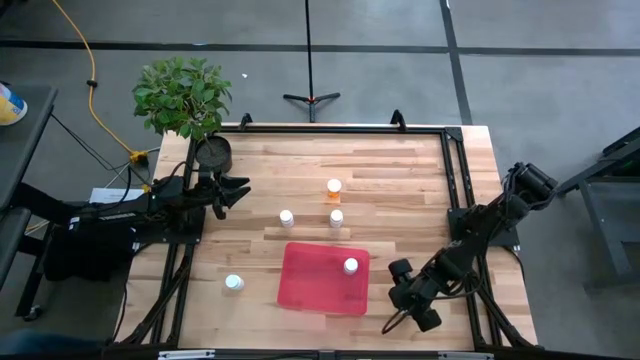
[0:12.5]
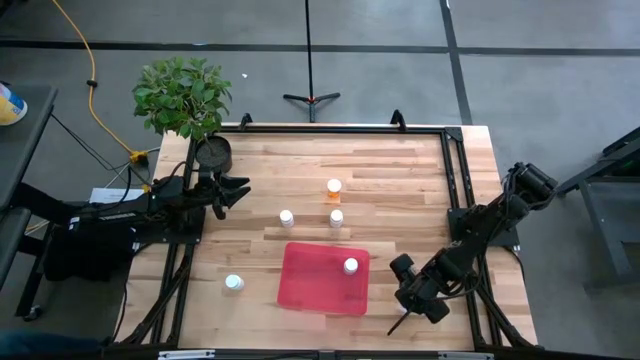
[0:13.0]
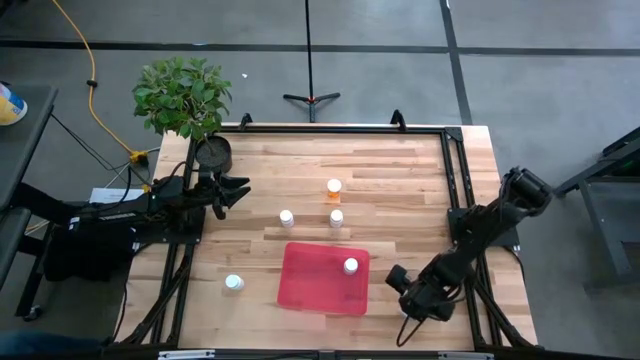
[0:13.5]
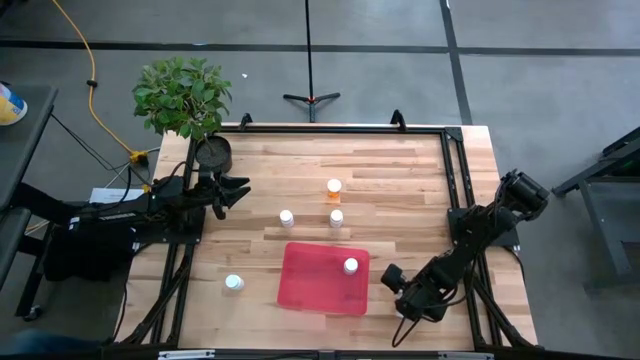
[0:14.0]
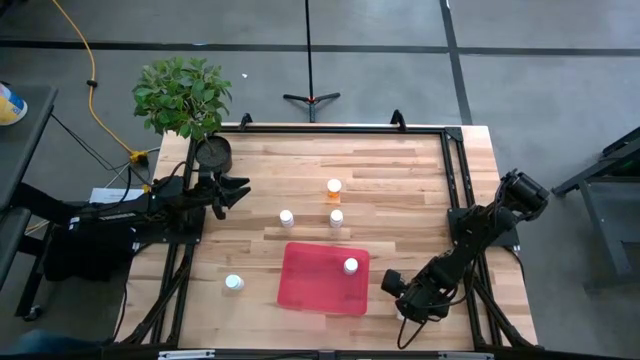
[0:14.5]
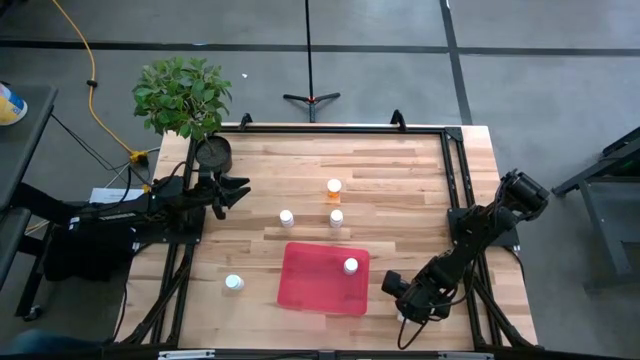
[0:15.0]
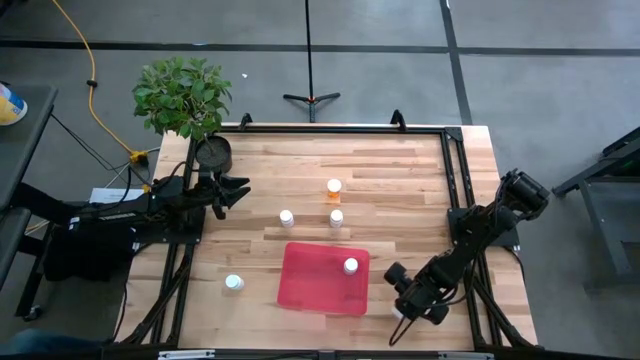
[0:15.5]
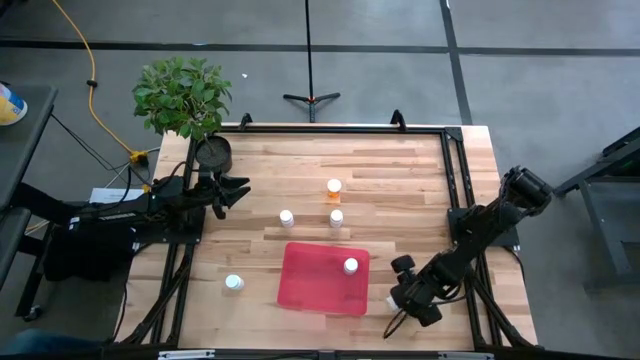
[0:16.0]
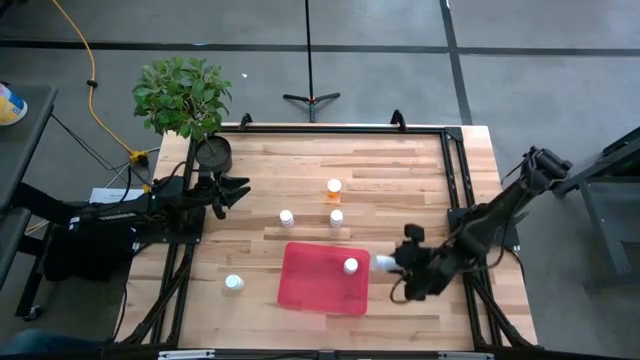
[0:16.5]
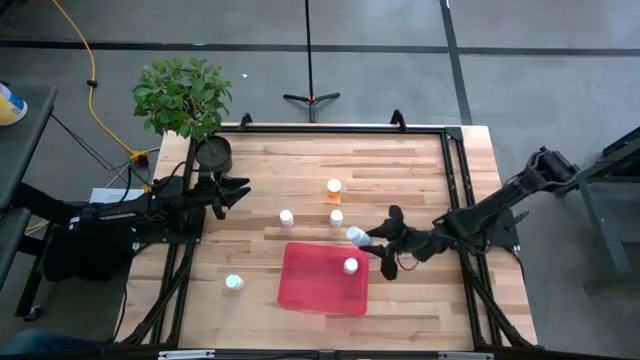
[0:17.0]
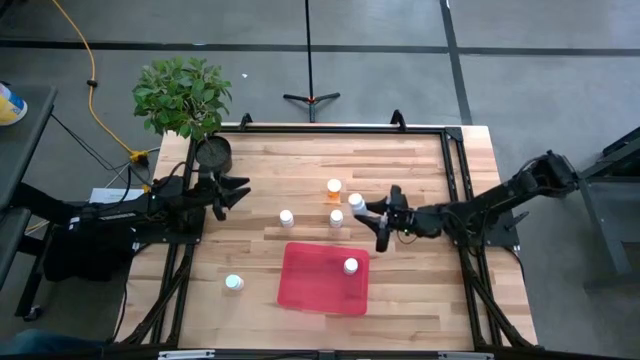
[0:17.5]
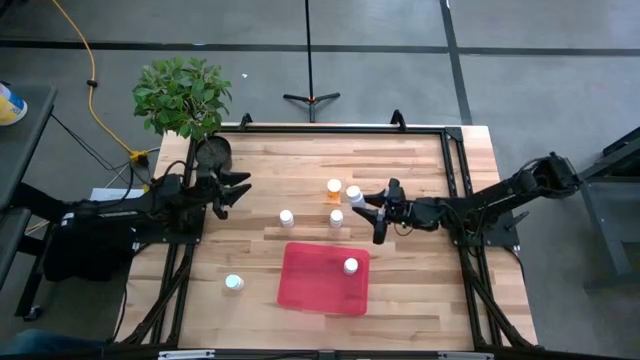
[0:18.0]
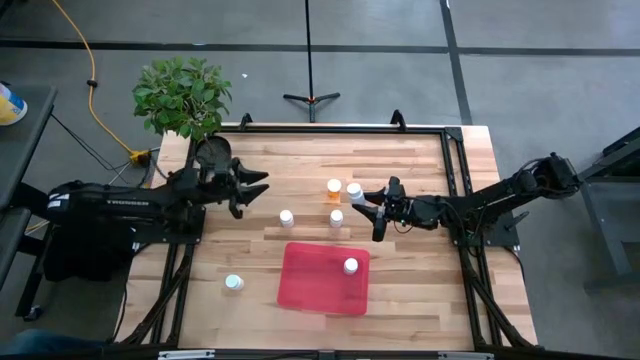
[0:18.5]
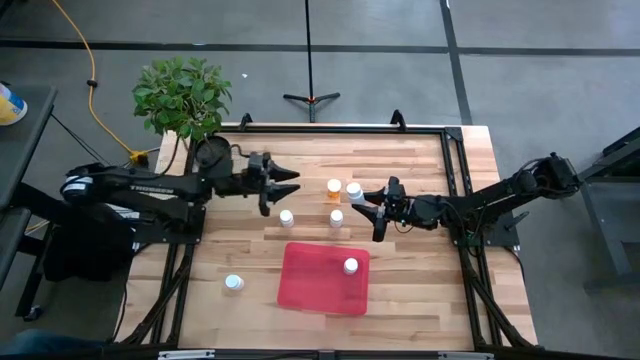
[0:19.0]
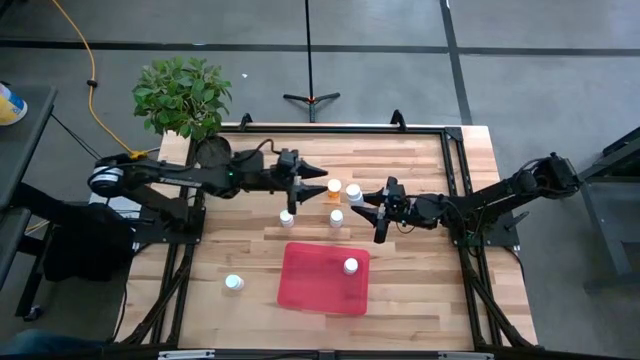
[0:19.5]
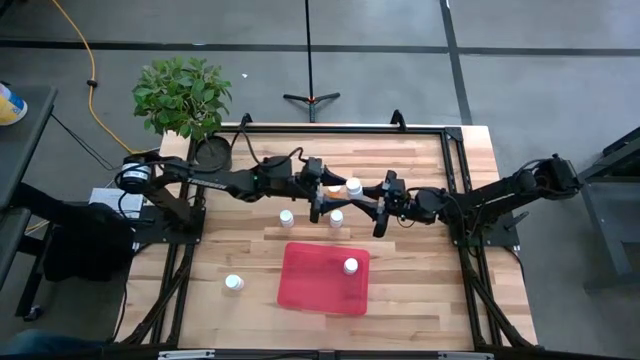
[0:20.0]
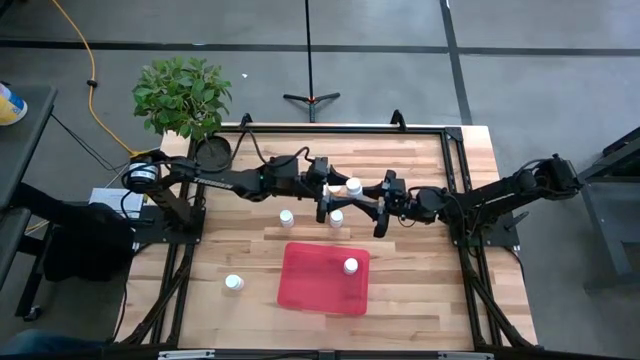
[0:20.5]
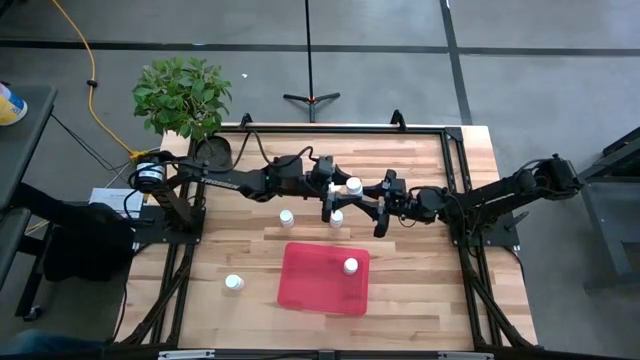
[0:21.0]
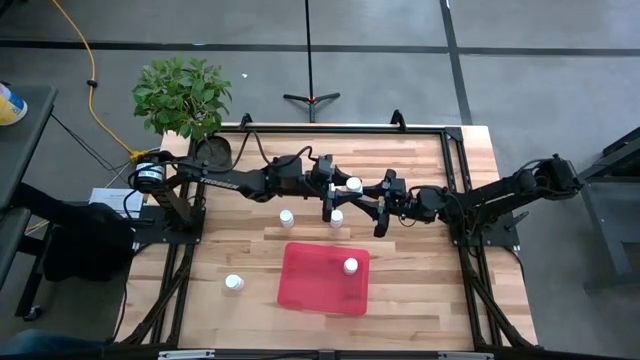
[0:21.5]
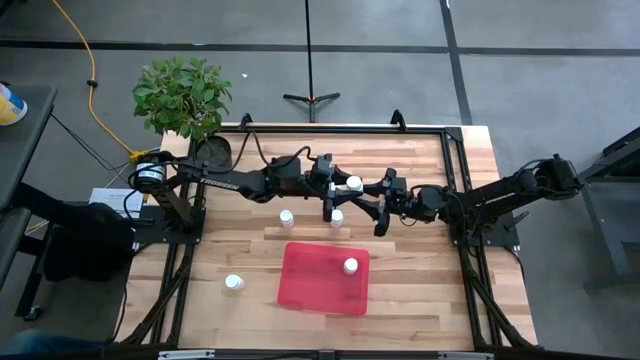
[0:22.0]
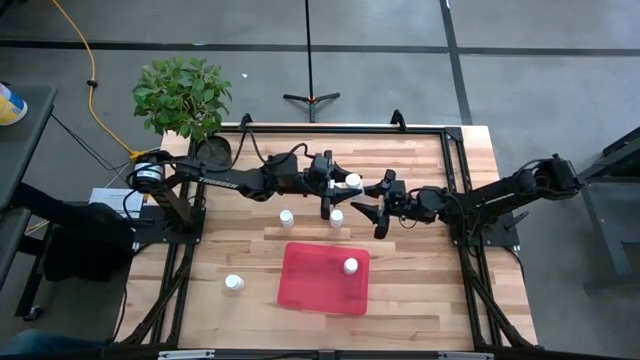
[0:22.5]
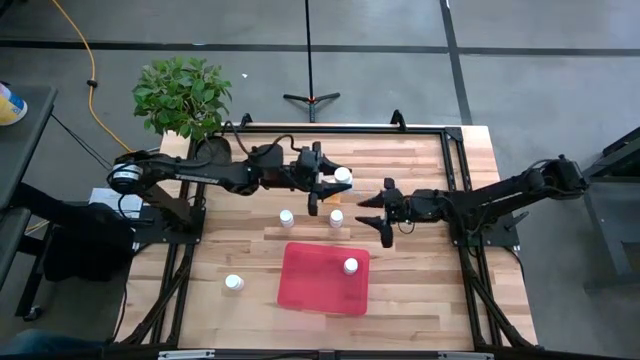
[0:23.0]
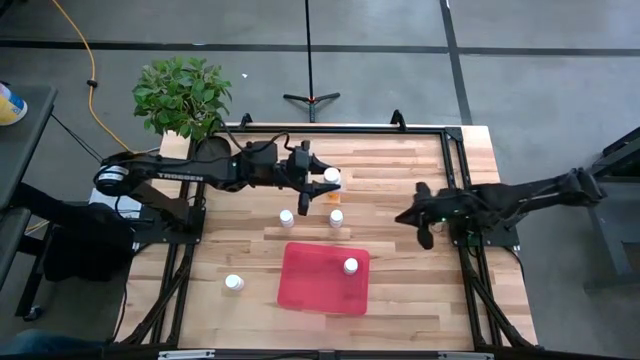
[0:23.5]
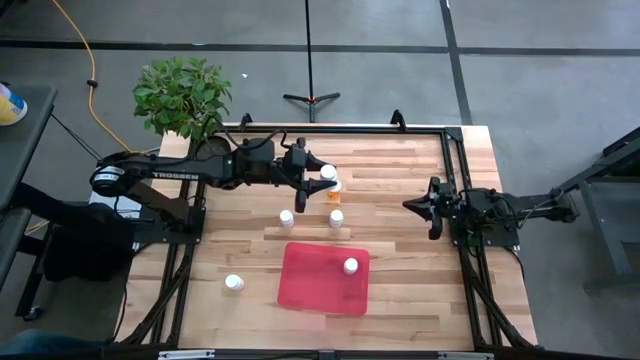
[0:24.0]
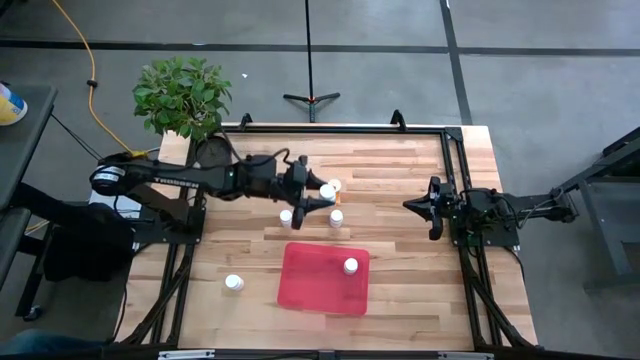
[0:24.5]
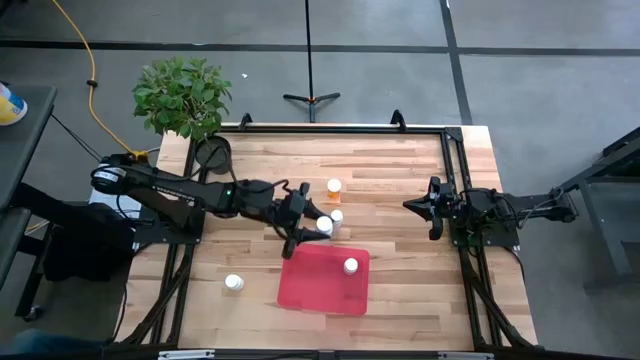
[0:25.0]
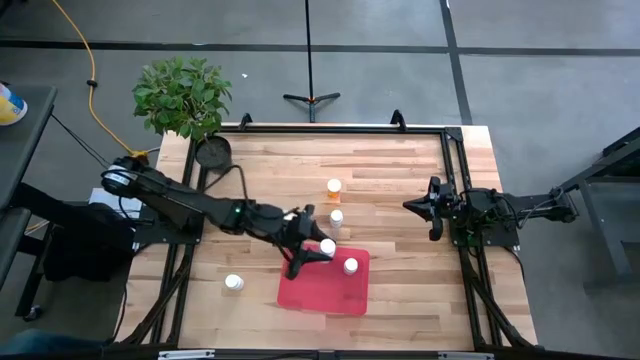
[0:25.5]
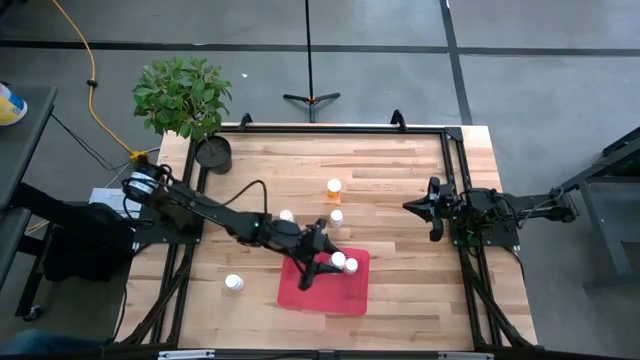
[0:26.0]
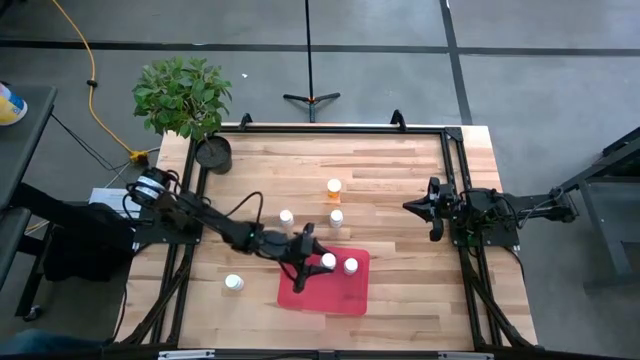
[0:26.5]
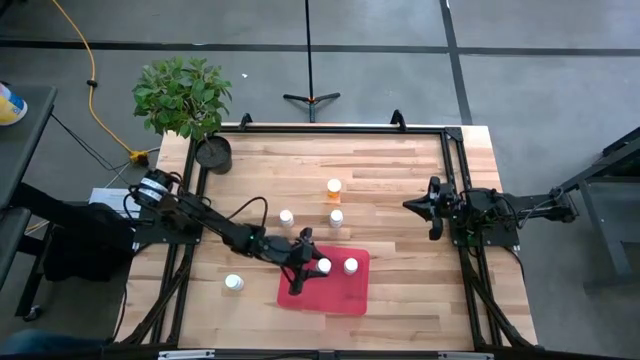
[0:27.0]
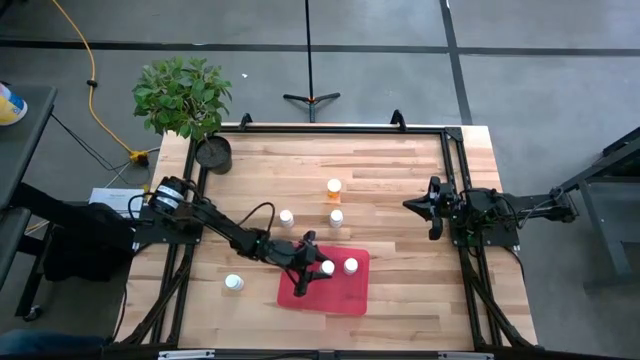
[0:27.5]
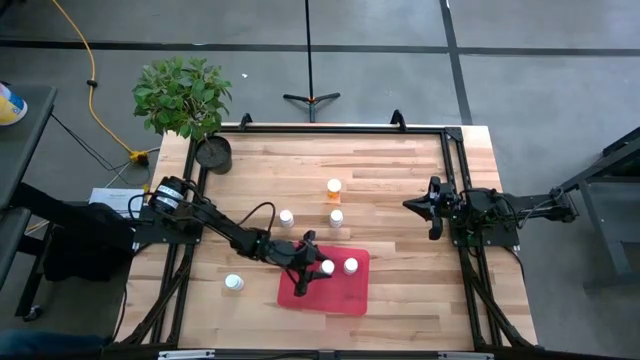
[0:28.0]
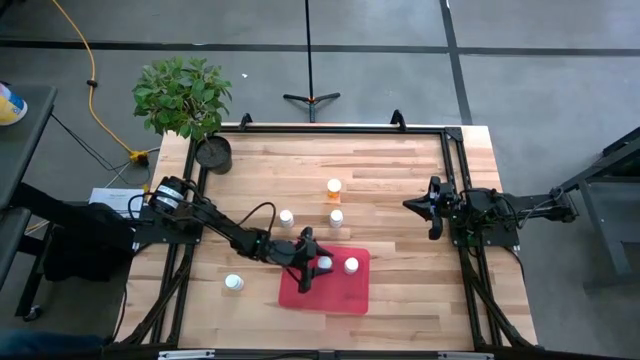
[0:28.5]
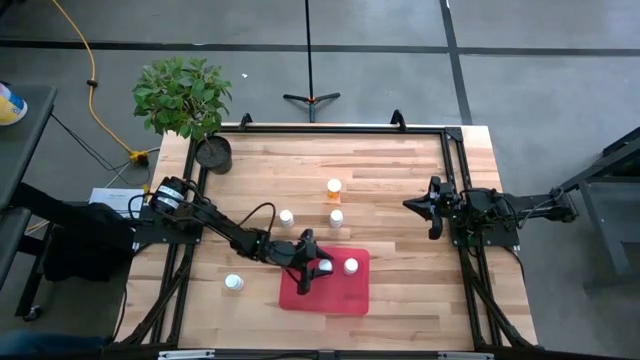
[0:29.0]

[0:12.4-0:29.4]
Task: Pick and place pill bottles into a basket
Put the white pill bottle into the bin
